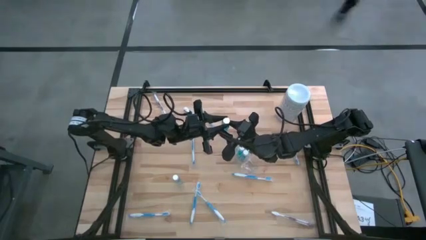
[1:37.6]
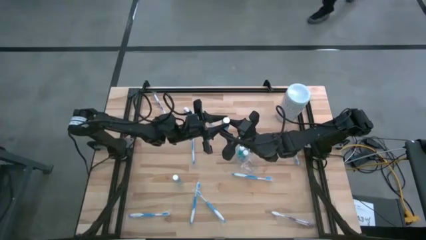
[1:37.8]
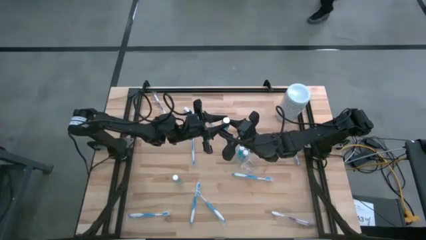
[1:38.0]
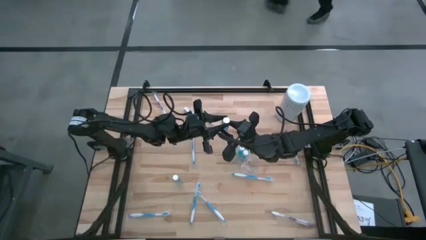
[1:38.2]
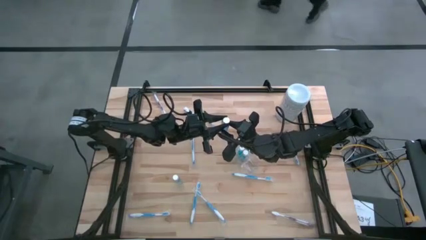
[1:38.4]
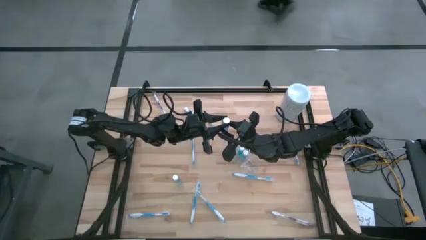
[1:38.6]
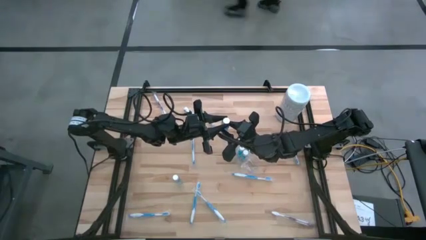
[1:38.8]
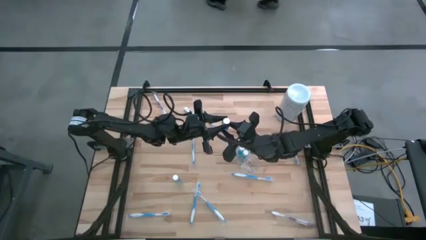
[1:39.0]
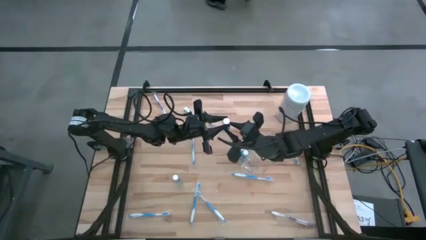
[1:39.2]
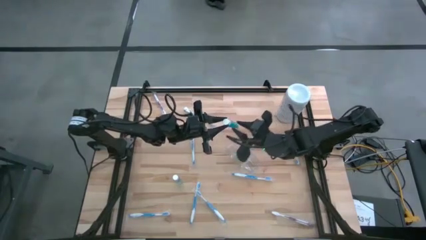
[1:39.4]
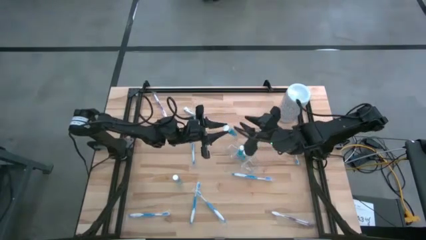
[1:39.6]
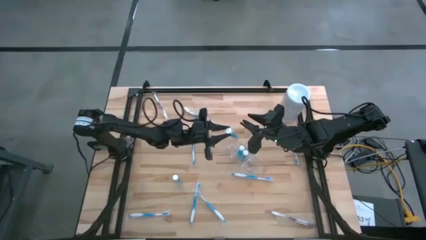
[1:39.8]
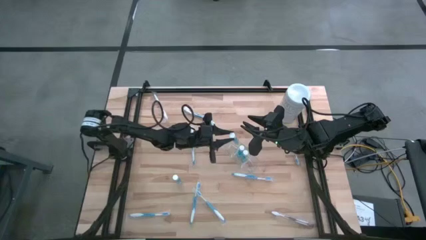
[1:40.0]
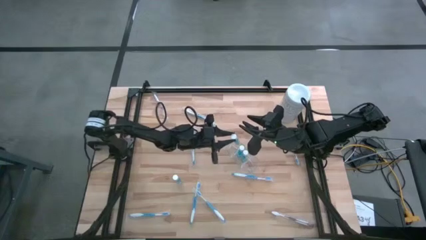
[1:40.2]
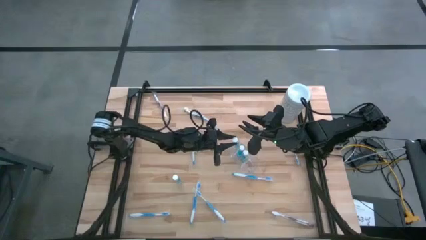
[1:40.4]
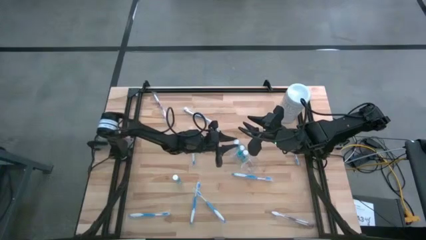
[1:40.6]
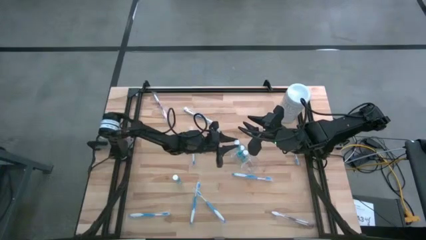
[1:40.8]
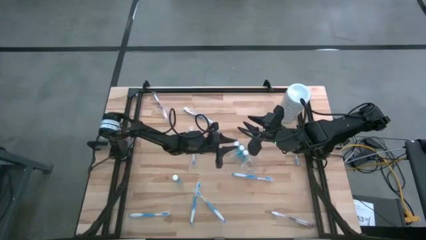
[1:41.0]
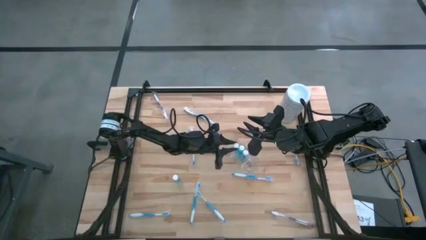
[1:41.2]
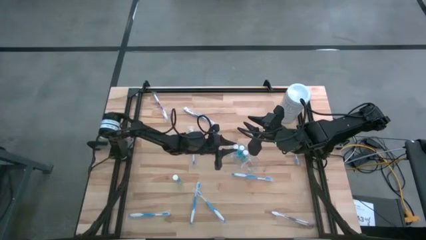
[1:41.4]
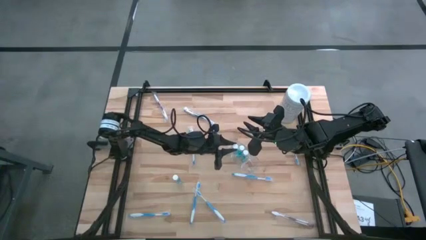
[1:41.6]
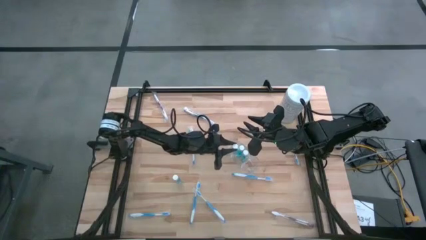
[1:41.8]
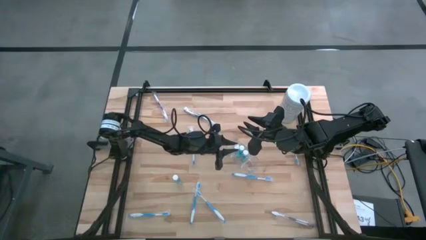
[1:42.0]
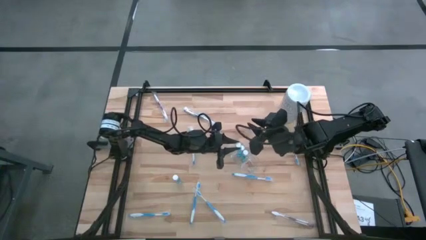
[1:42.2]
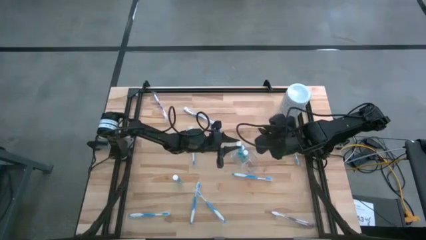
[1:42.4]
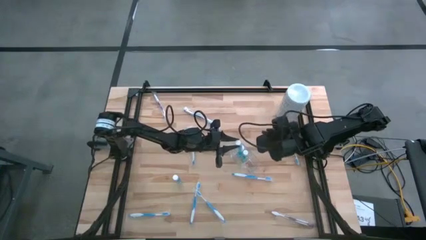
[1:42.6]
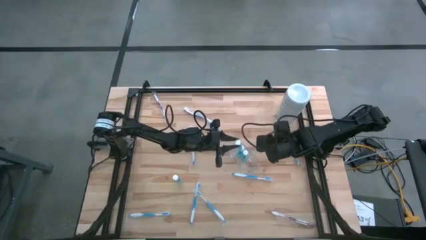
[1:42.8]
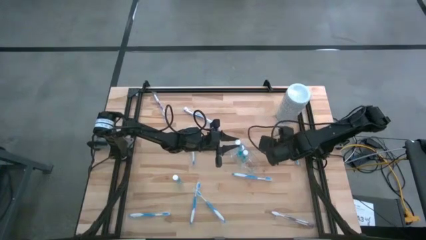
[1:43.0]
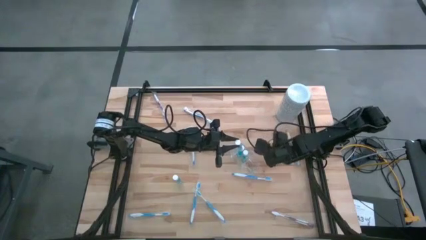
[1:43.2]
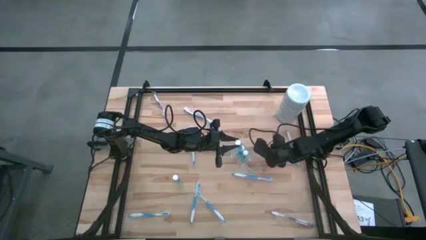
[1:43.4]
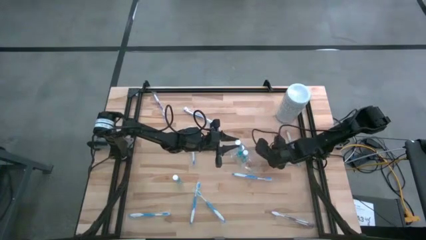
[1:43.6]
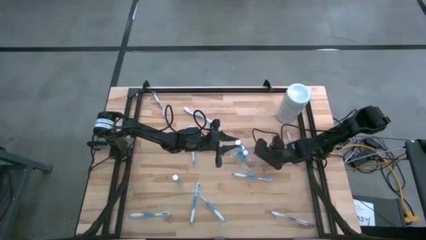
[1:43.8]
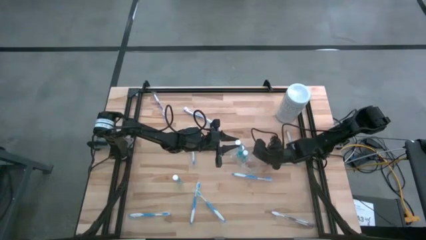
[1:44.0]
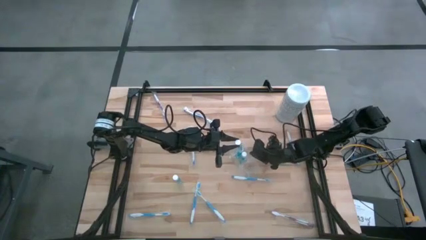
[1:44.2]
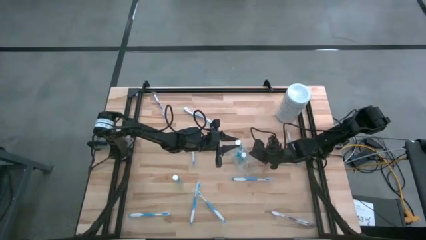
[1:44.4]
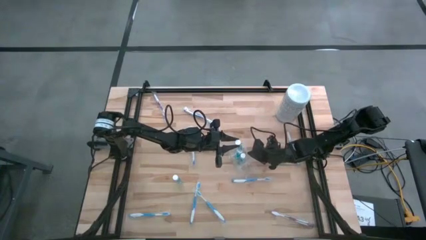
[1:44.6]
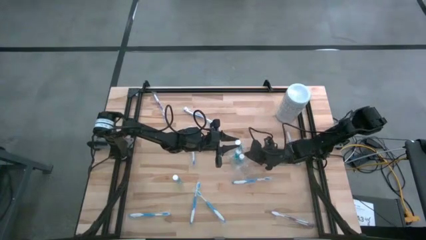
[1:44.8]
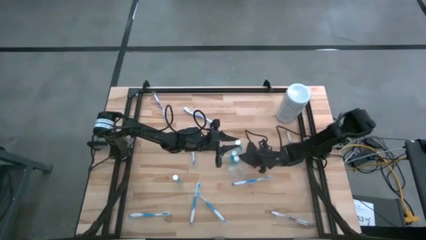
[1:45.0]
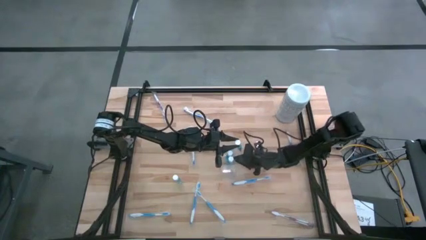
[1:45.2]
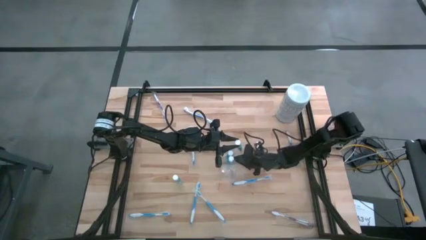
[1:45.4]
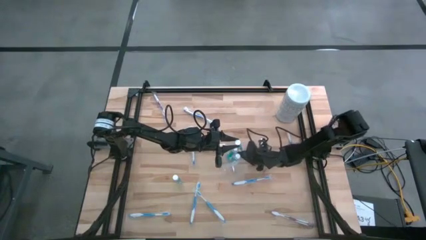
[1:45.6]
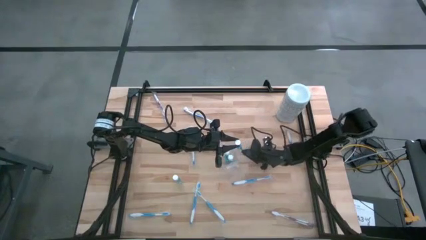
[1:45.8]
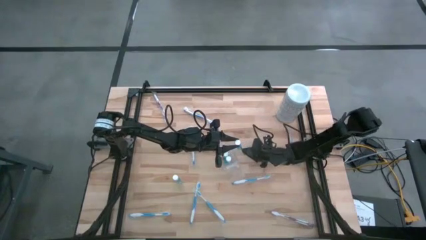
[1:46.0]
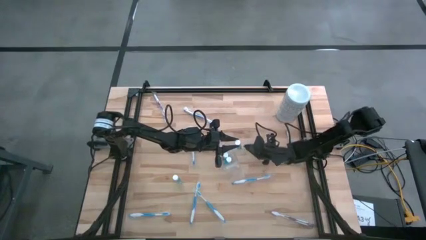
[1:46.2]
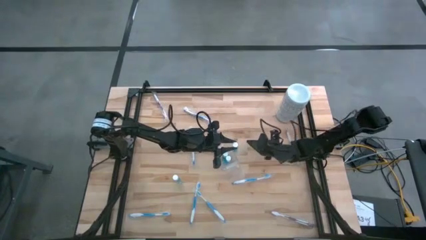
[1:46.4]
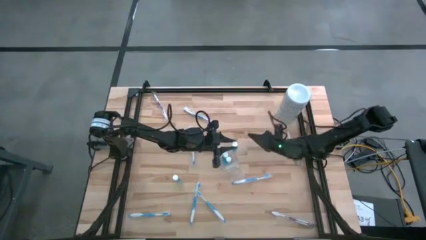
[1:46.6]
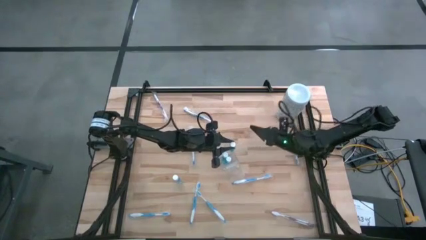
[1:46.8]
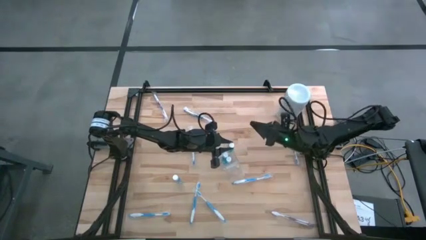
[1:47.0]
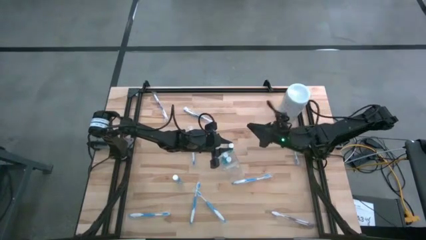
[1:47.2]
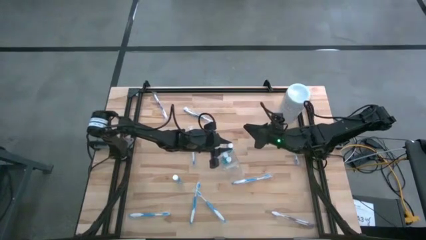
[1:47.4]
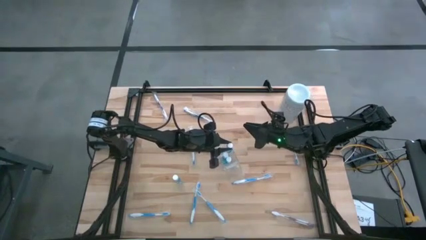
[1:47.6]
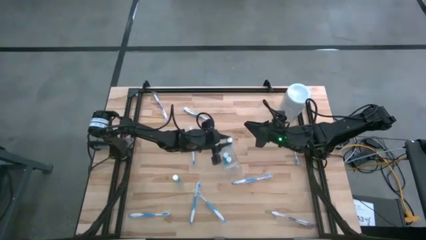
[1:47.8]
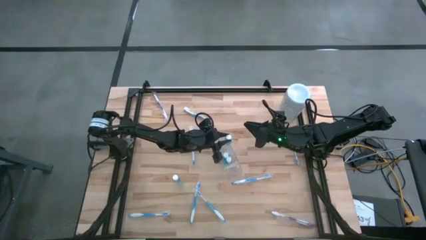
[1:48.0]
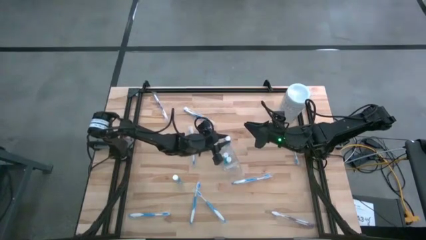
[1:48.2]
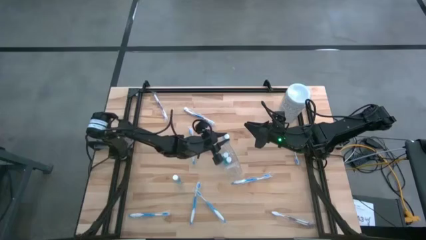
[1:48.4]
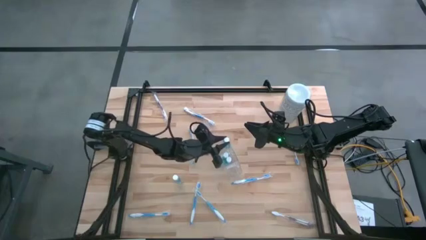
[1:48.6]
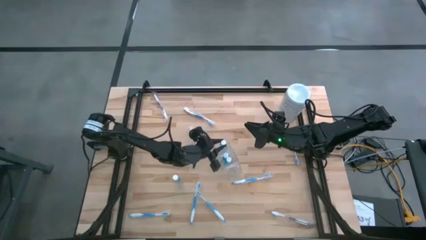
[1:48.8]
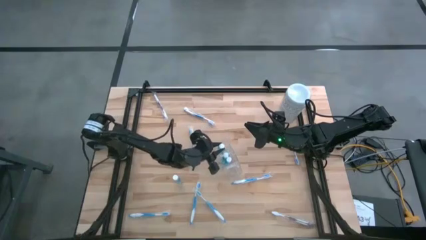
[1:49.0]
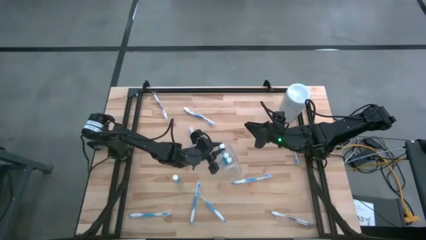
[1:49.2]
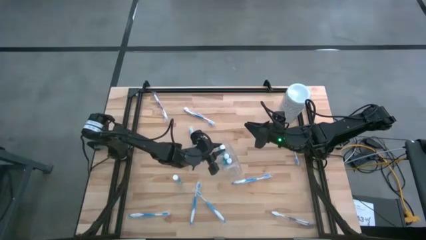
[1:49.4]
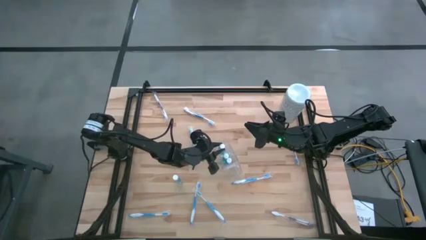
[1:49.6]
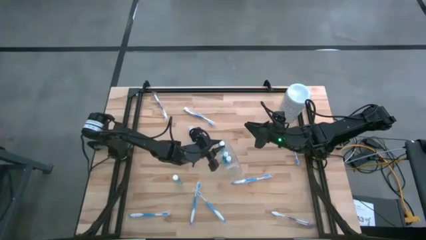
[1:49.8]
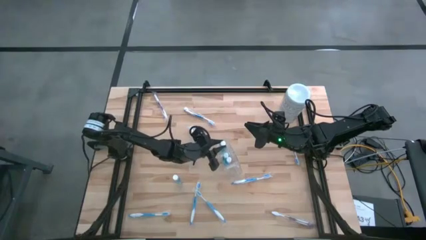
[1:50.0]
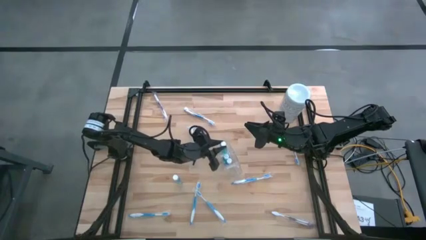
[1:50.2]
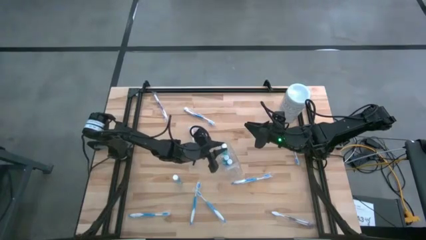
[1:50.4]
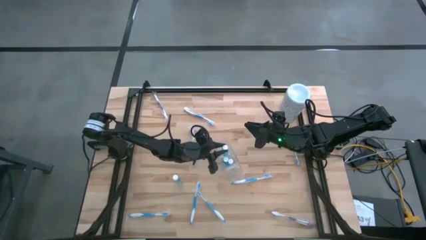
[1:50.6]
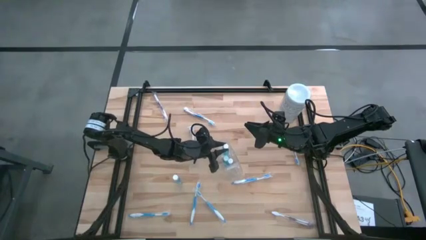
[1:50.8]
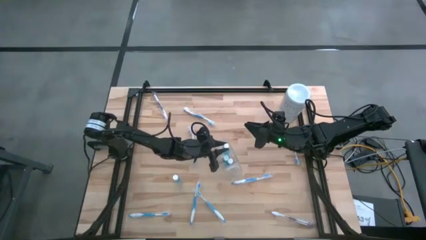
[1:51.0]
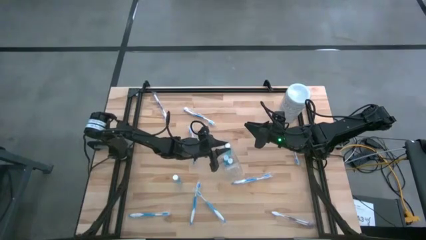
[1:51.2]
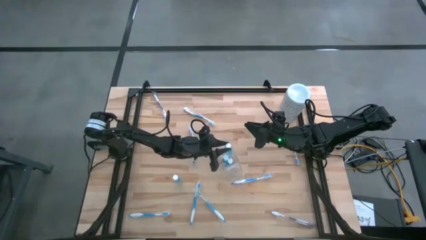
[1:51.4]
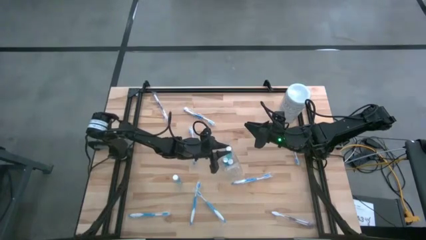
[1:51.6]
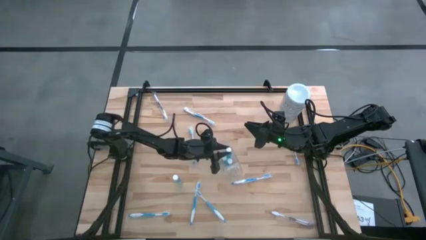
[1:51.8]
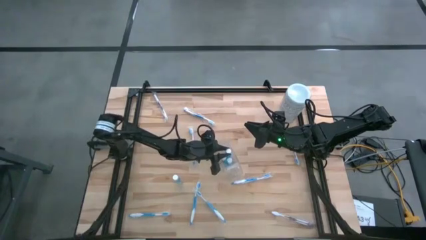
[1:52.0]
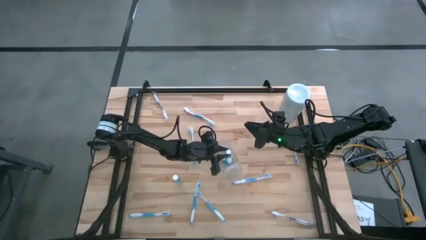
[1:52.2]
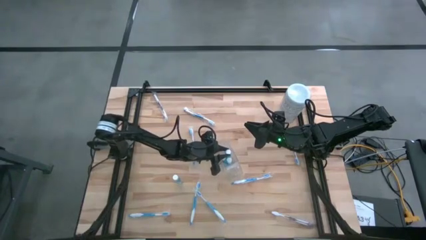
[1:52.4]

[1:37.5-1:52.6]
Task: Pick & Place toothbrushing station
Put the blue mouthwash into the middle section of the transparent organizer
